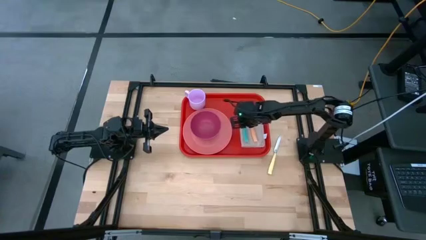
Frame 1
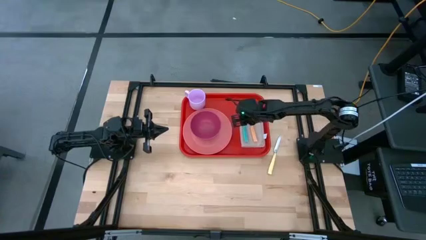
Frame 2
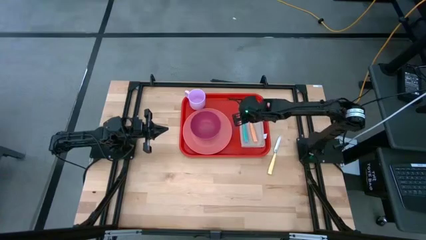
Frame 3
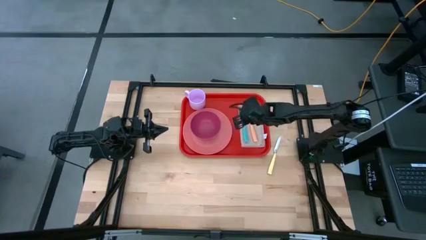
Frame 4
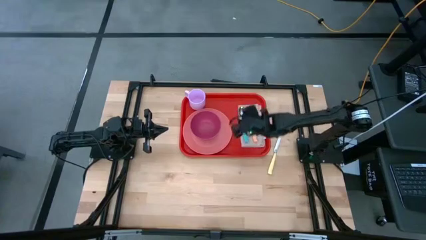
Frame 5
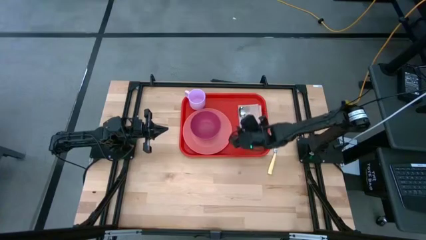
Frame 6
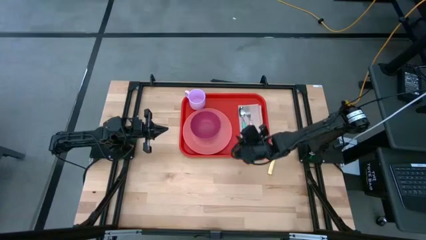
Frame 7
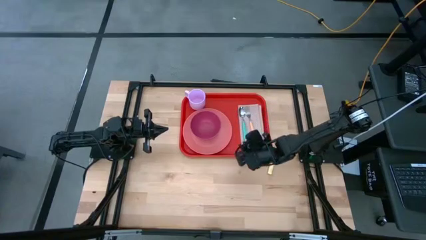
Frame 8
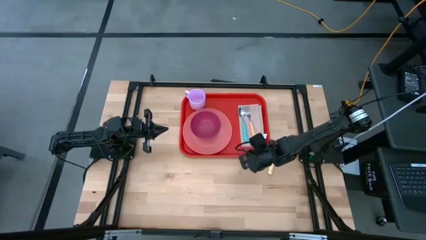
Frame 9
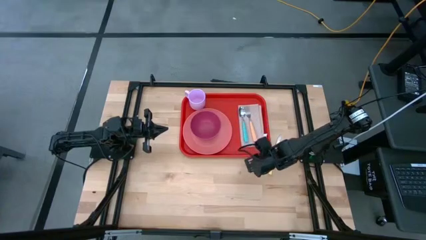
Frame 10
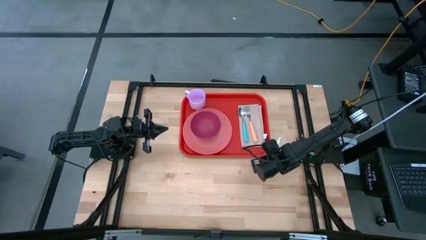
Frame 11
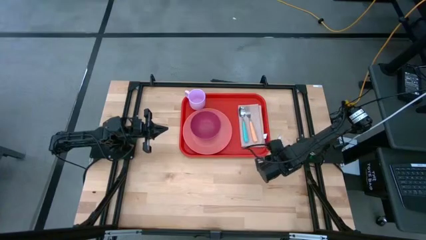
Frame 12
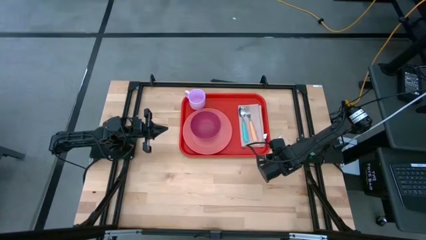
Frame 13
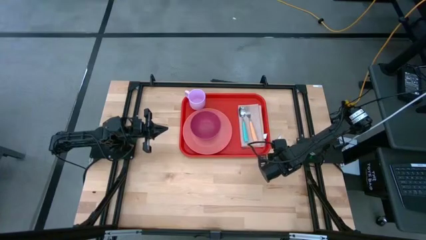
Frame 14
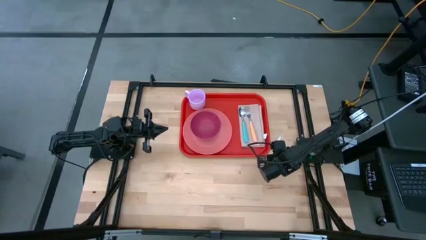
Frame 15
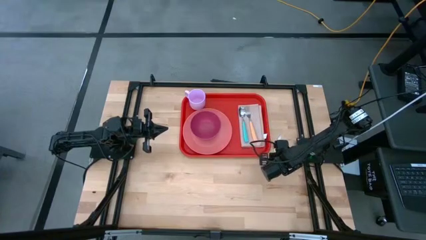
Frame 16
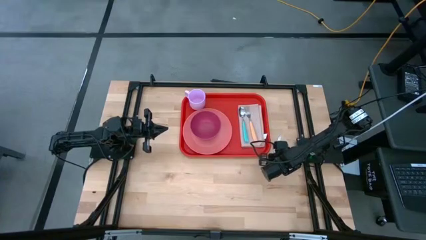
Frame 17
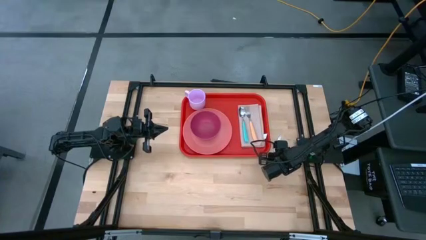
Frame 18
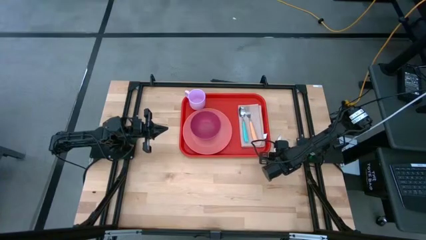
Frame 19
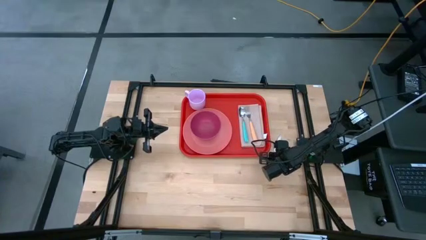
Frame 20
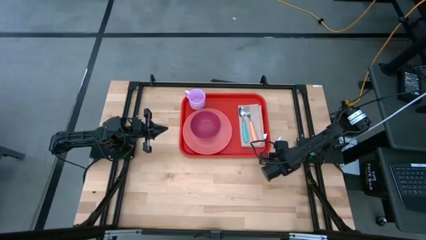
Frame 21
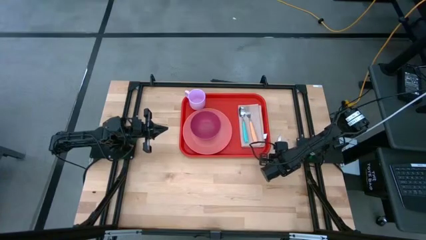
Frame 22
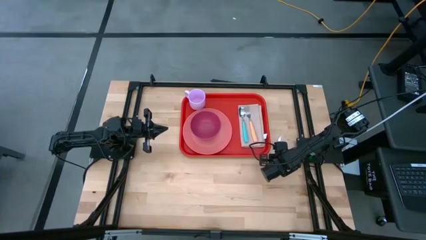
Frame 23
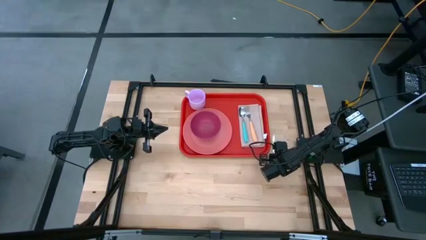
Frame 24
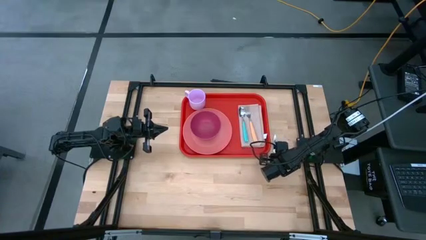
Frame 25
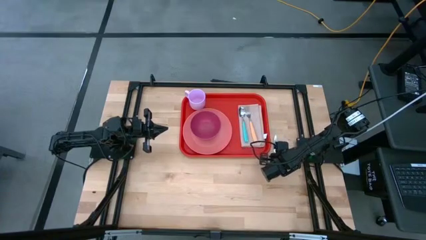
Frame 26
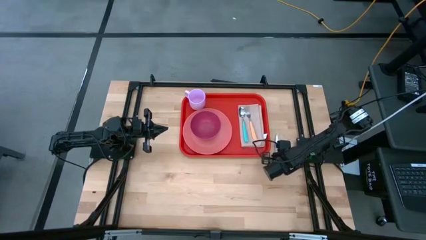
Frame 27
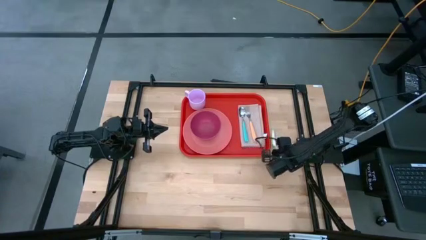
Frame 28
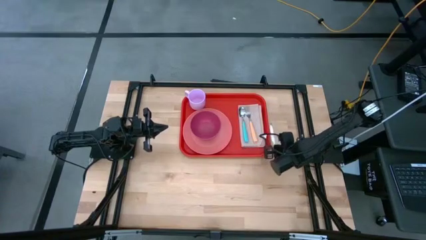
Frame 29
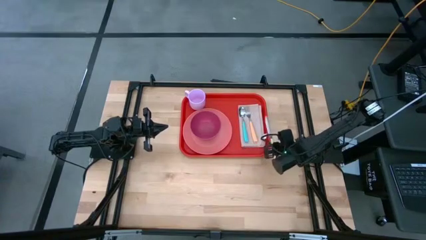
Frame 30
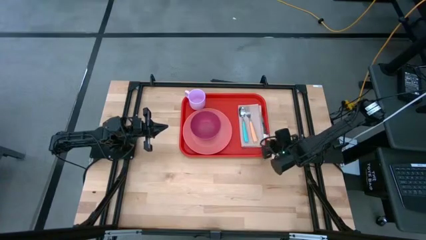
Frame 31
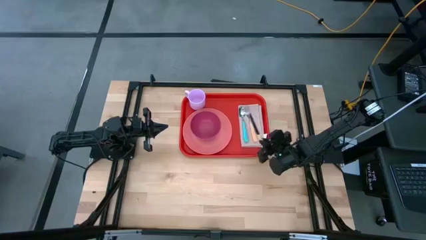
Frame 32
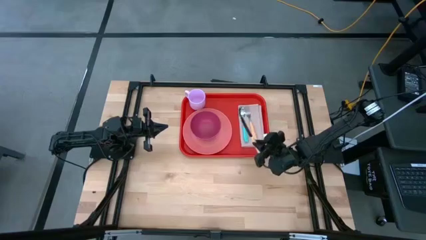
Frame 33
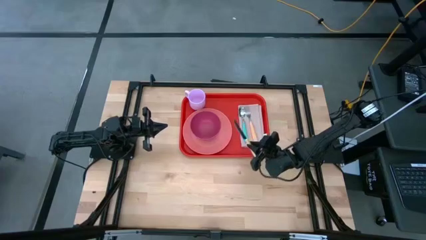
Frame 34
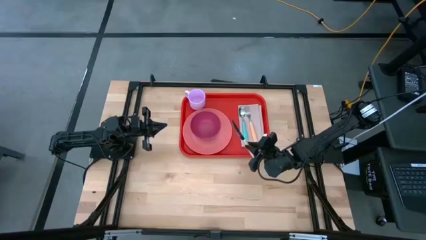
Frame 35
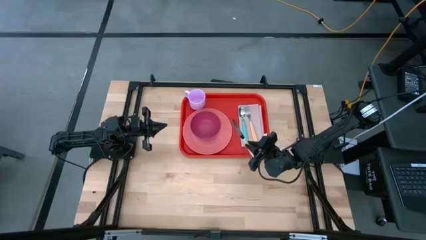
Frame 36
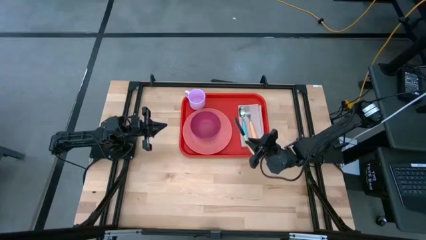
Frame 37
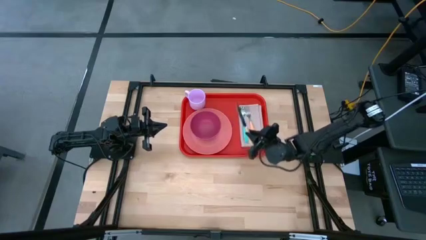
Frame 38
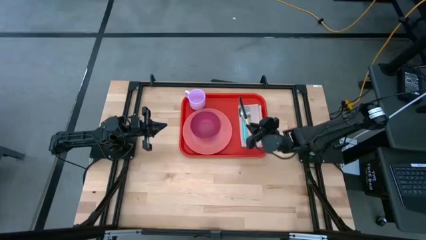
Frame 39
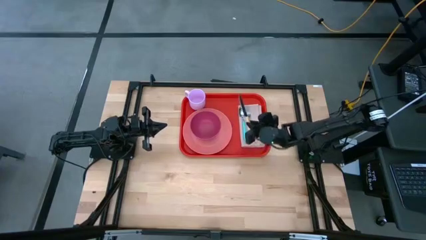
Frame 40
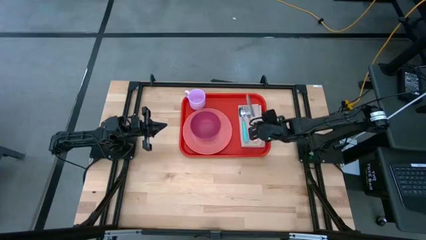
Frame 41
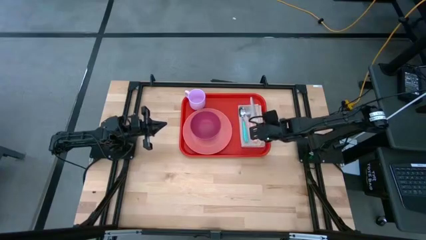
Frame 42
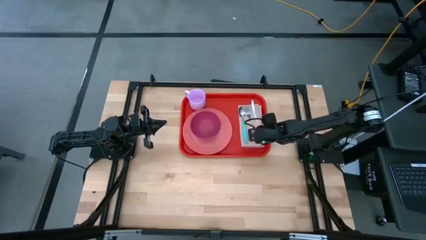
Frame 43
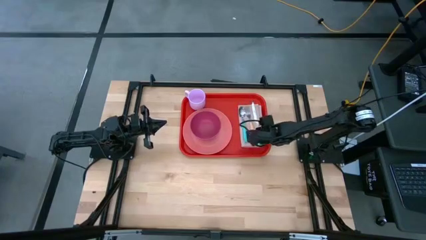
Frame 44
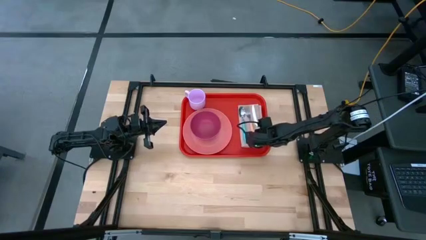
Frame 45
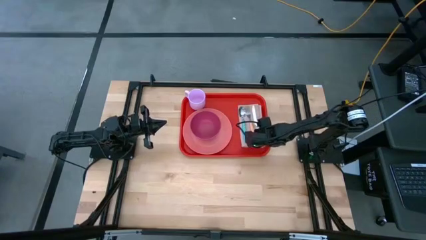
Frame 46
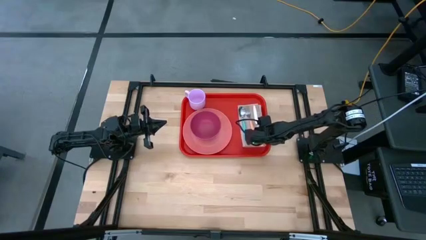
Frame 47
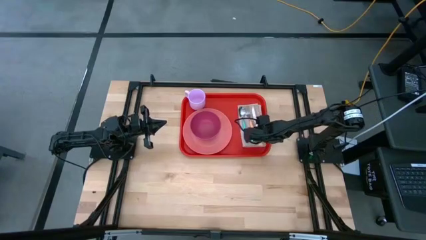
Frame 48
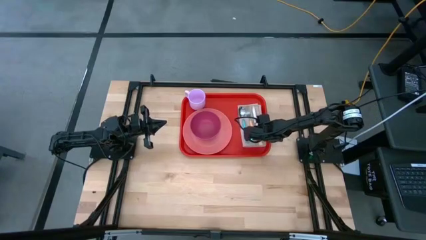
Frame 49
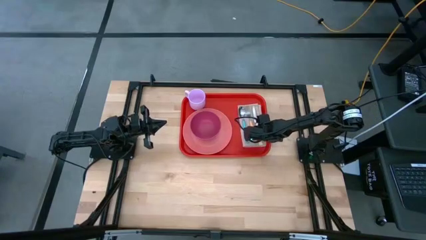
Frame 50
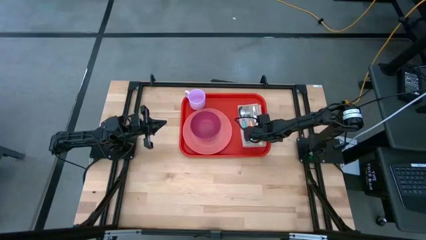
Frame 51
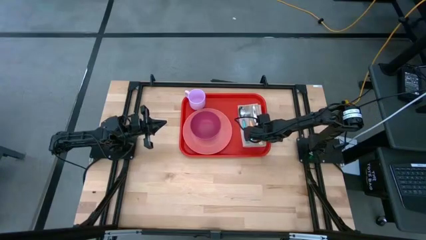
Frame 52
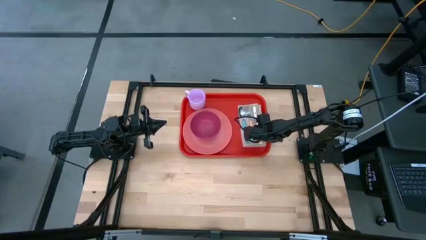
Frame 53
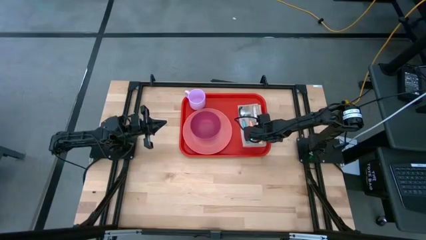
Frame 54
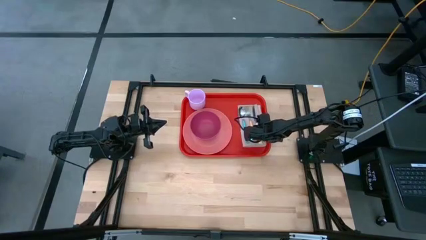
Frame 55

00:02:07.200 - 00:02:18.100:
Task: Set up tray
Put the yellow table knife on the brown table napkin to the right of the orange fork

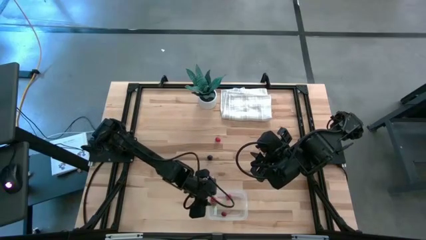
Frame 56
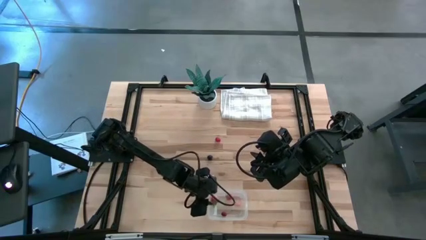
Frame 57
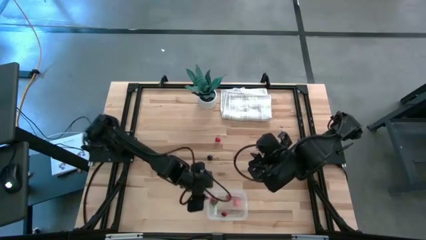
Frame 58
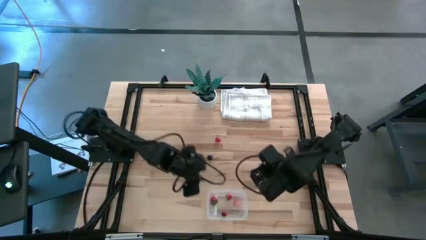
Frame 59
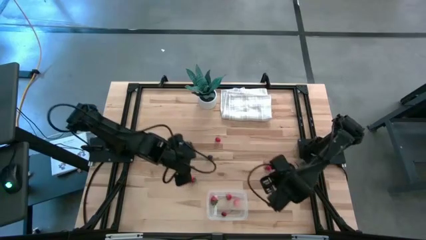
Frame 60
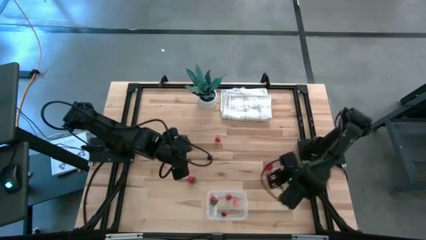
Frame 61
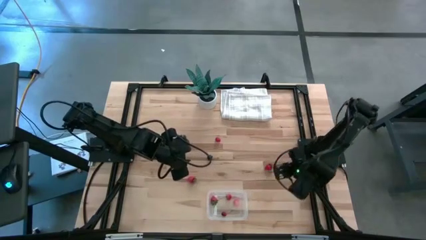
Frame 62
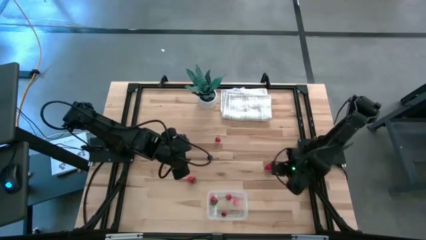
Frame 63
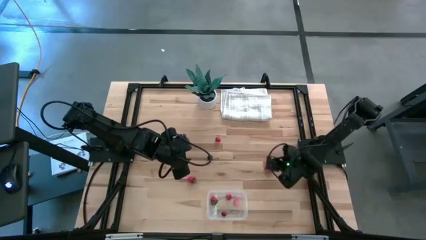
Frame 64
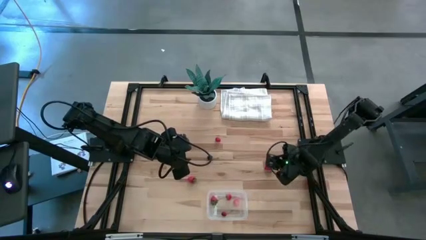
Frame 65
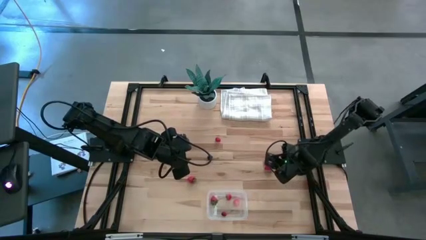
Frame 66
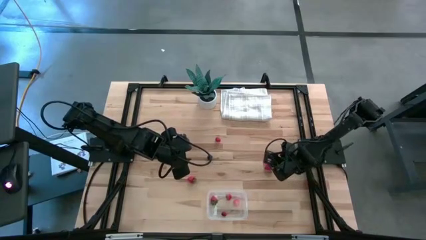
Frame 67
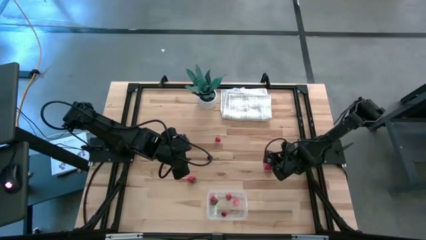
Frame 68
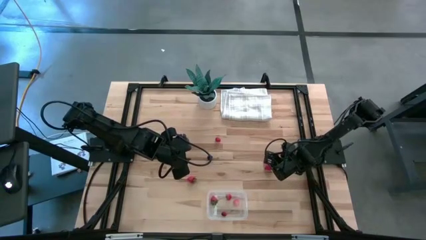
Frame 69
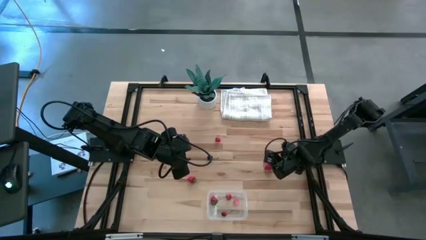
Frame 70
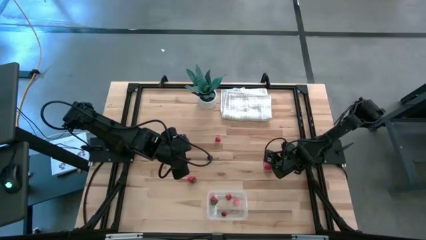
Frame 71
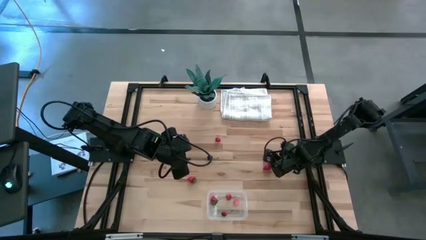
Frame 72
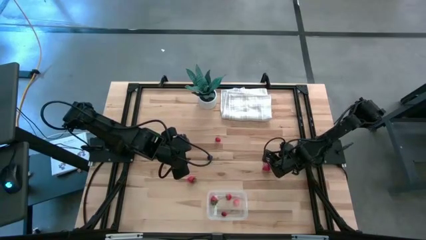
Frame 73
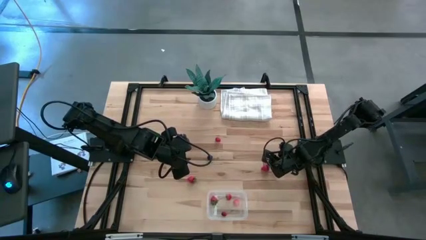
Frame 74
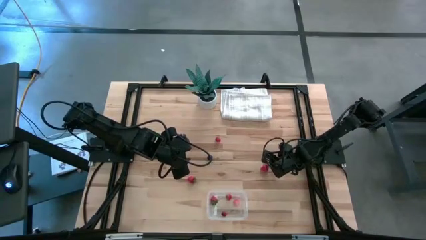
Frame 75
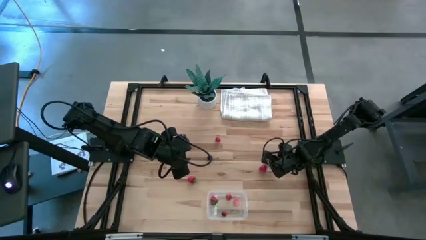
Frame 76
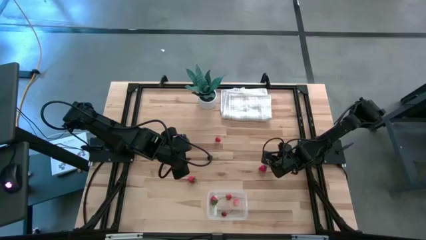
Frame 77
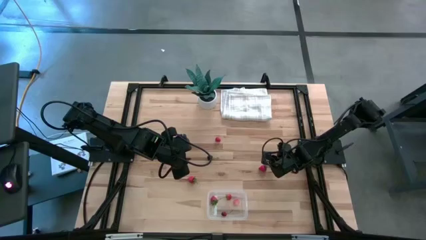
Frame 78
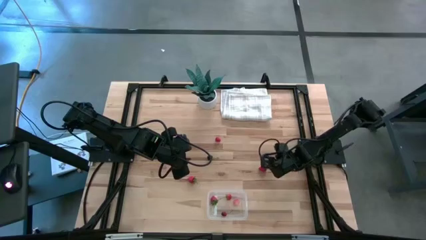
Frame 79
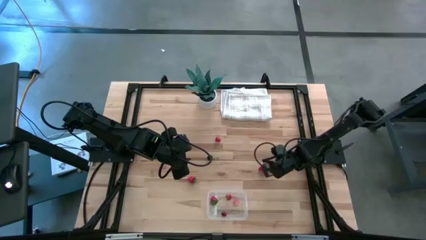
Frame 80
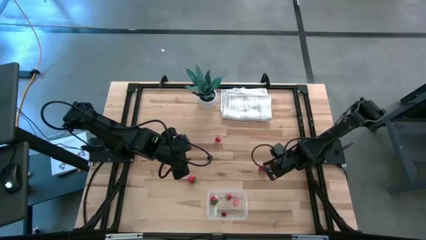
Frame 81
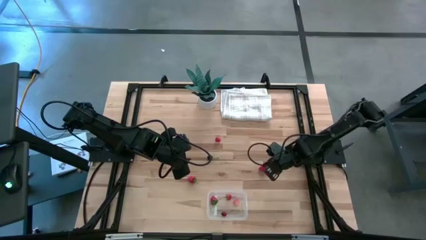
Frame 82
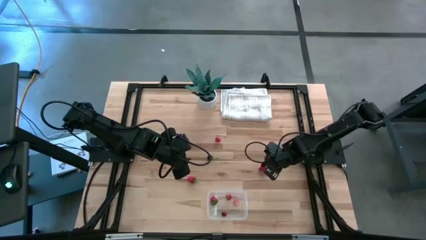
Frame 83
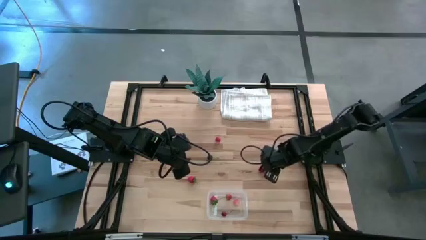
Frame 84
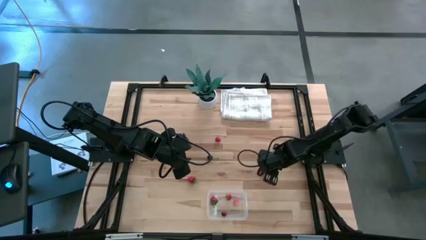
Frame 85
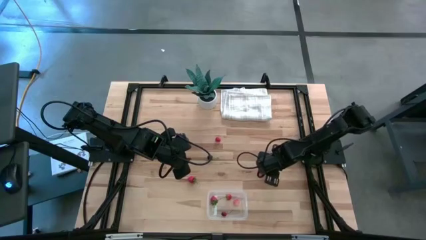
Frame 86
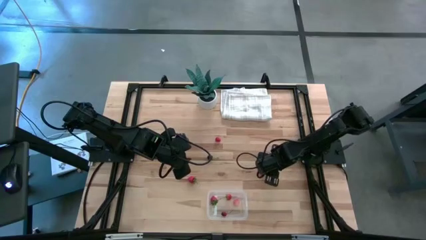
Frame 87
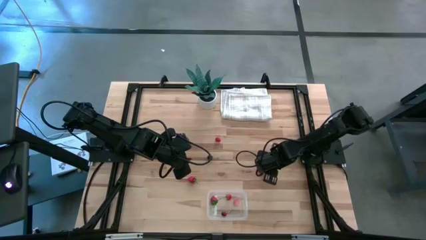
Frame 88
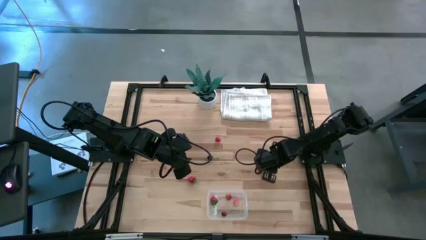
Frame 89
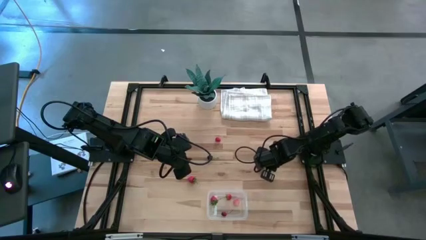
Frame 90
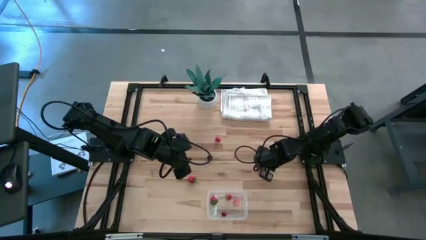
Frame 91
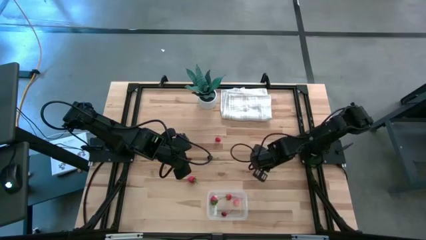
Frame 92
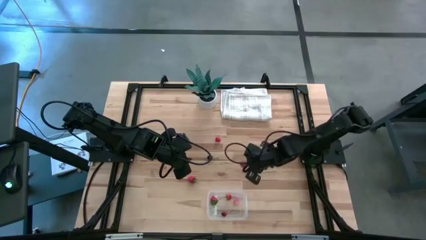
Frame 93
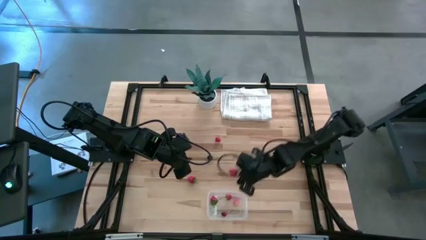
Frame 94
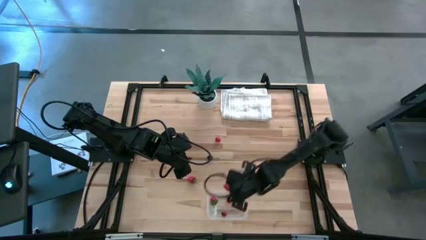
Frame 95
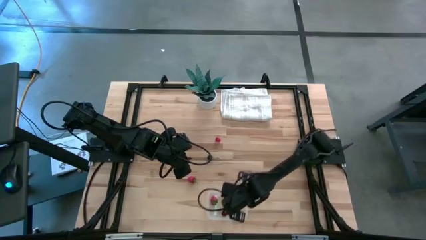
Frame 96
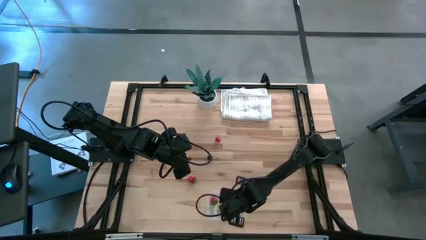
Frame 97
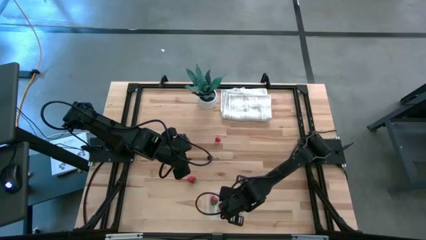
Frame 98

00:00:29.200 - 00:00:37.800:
Task: Pick and placing Produce into tupperware
Put the strawberry into the transparent bin
